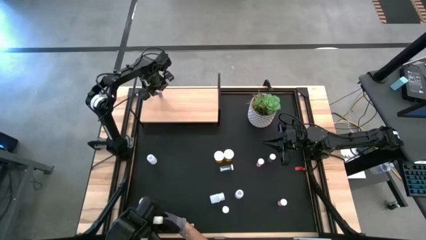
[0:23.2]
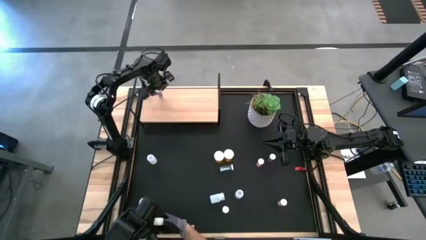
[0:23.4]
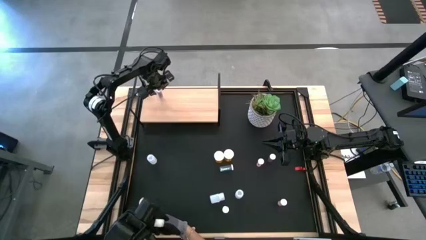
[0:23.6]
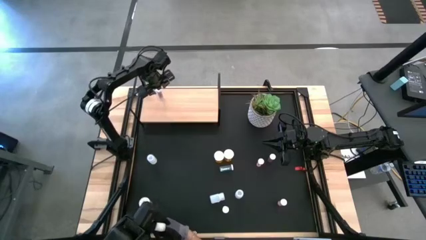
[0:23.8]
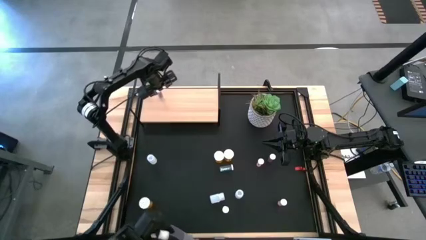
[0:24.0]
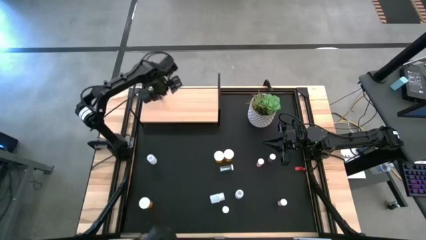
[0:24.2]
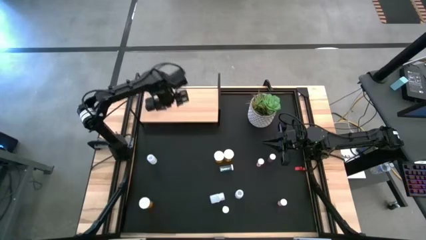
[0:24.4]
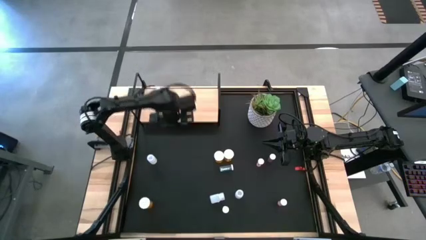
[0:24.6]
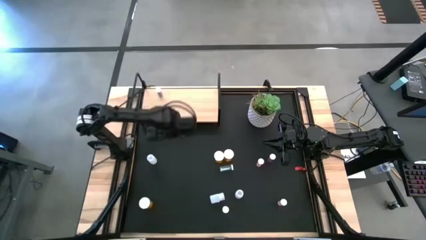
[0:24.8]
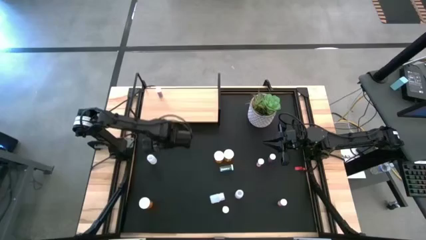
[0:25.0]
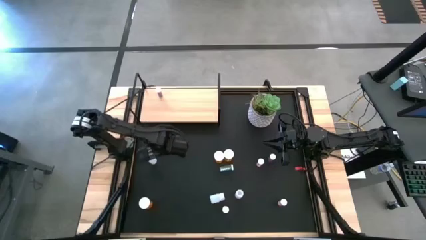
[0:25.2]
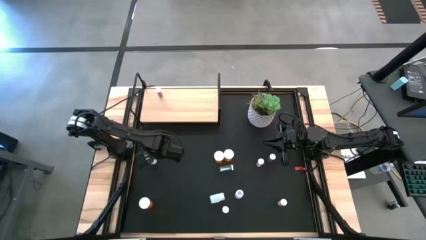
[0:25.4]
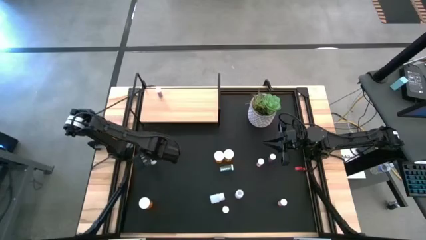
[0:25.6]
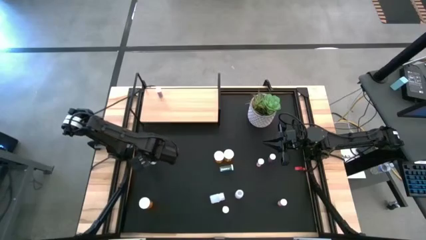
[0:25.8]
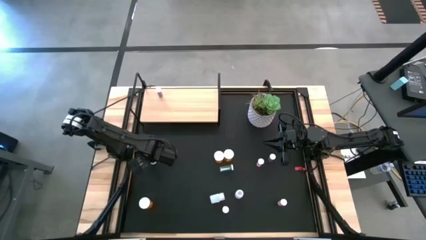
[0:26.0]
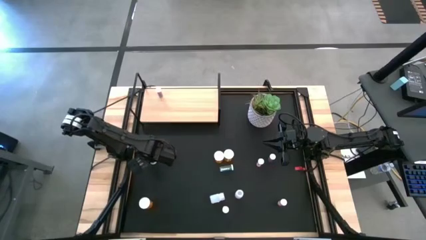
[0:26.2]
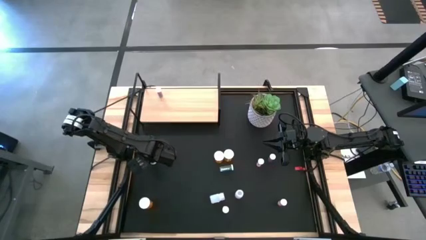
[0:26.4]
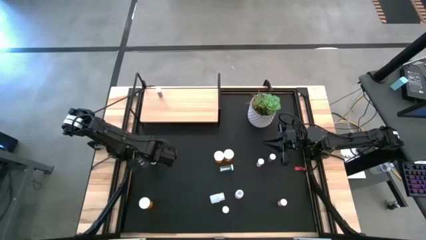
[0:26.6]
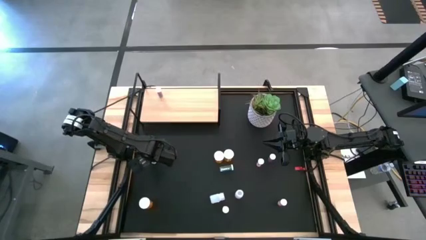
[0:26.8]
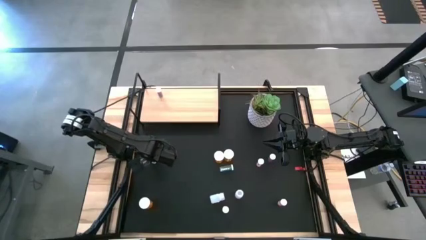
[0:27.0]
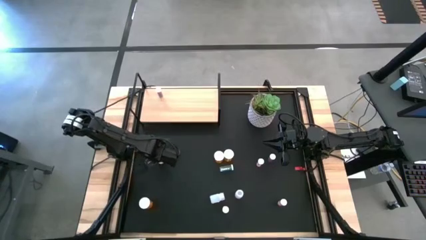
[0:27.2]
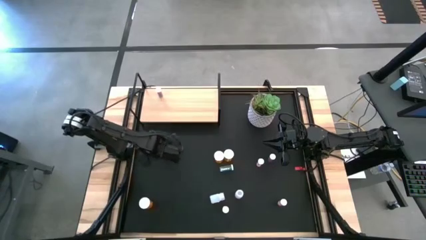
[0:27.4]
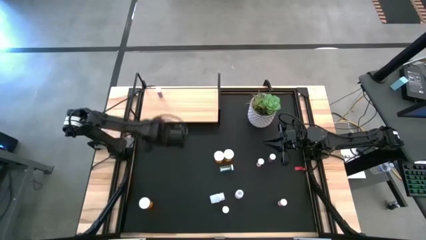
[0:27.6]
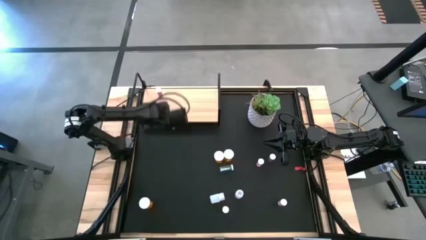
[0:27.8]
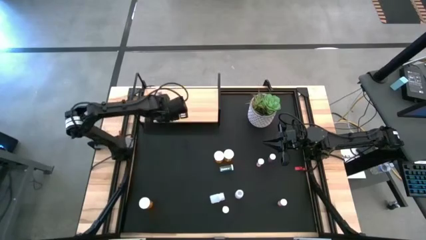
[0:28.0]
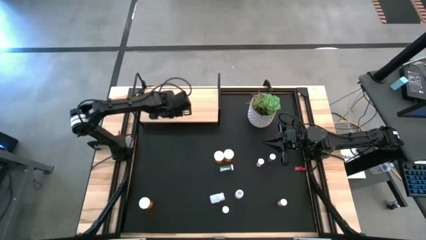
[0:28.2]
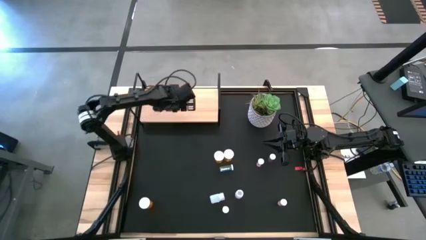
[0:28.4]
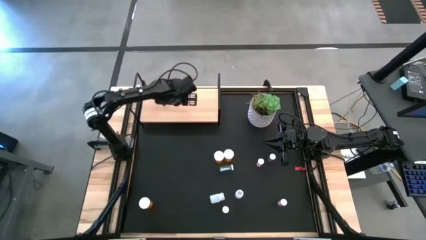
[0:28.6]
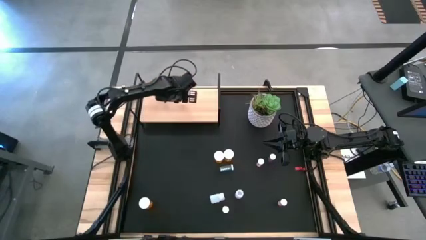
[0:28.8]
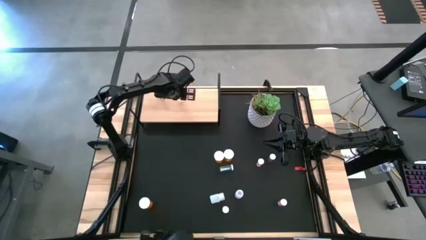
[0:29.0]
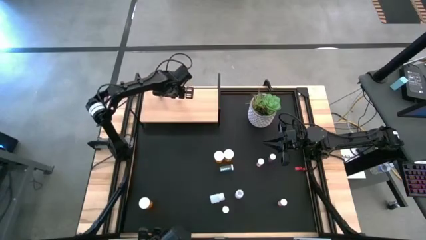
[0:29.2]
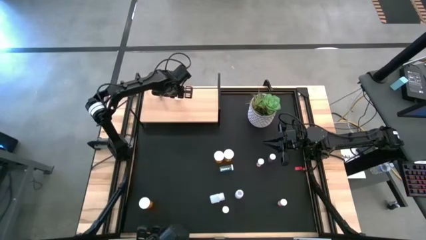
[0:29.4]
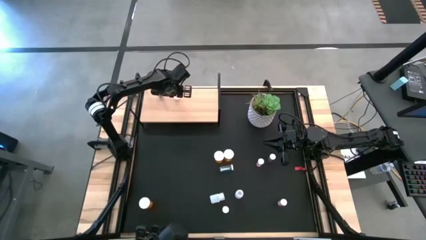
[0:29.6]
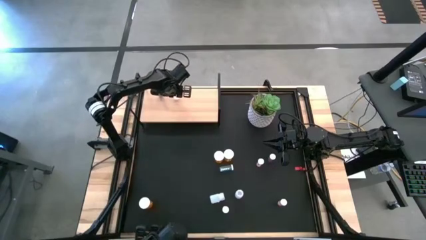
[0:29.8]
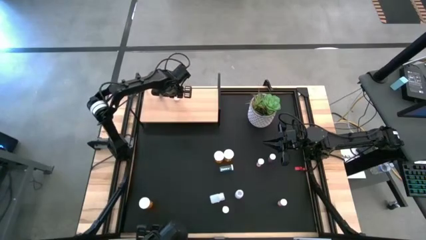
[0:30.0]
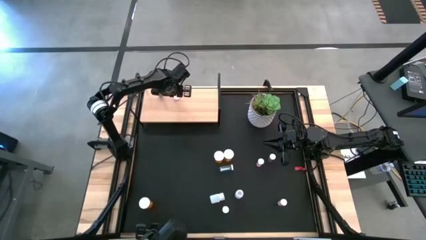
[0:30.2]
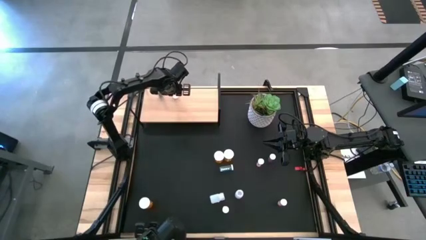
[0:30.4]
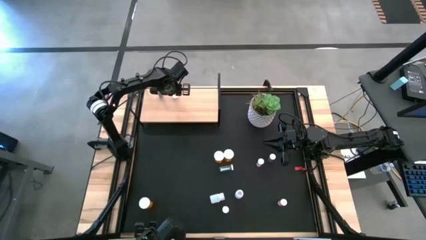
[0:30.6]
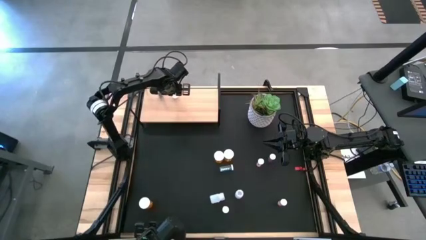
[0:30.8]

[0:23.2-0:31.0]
Task: Pick and place medicine bottles onto shelf by color
Put the top left white pill bottle on the shelf

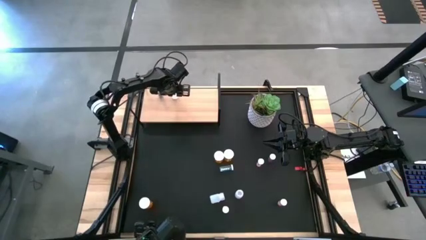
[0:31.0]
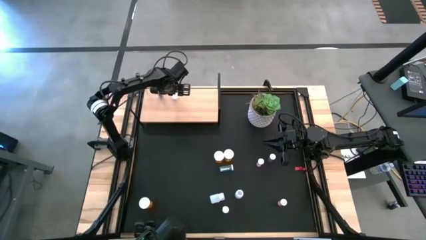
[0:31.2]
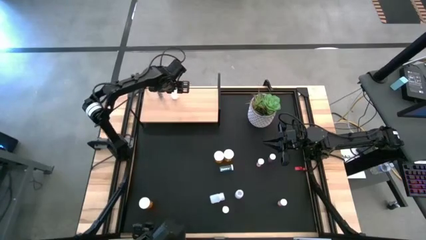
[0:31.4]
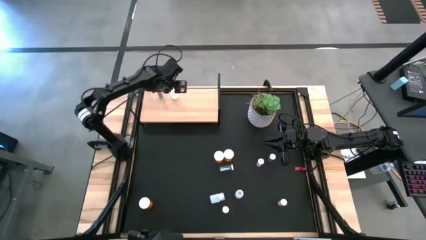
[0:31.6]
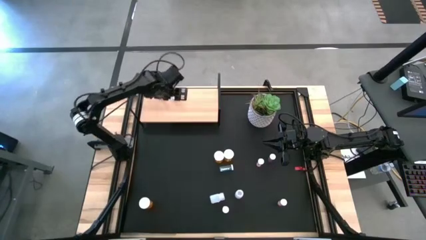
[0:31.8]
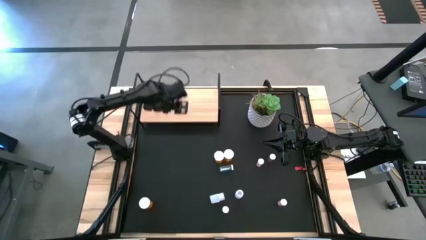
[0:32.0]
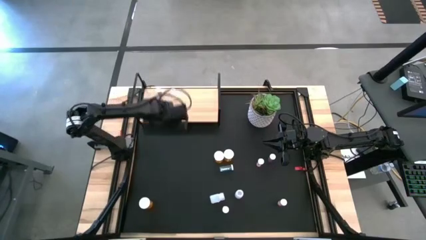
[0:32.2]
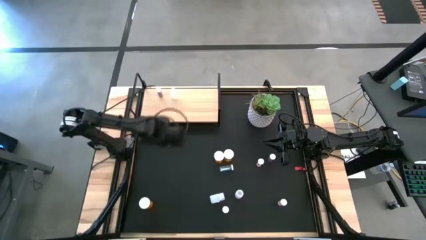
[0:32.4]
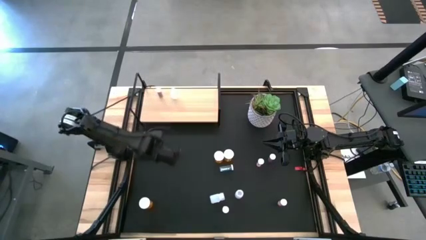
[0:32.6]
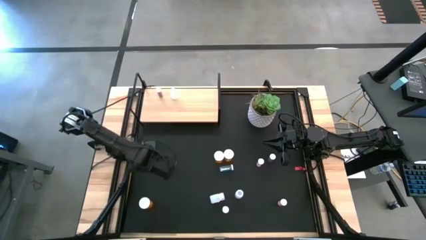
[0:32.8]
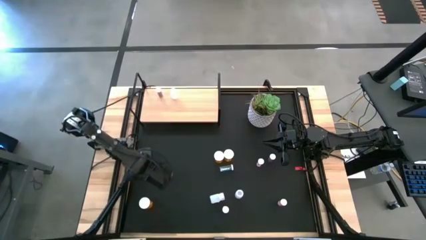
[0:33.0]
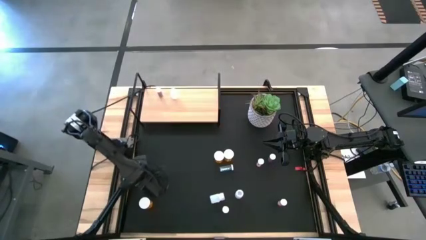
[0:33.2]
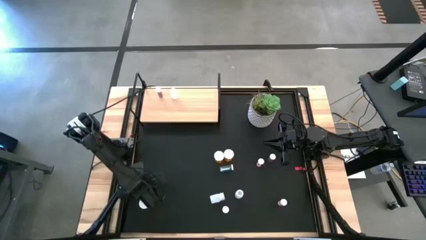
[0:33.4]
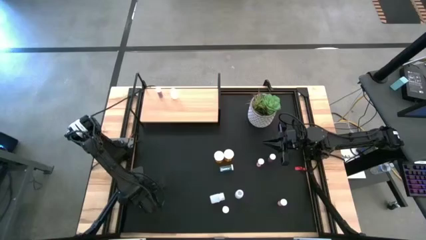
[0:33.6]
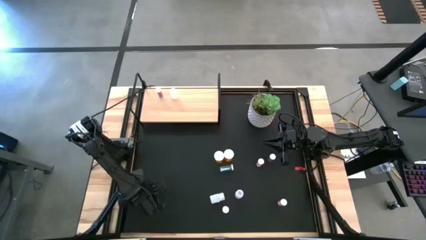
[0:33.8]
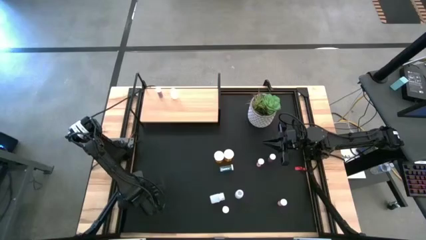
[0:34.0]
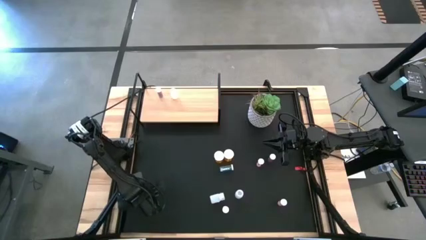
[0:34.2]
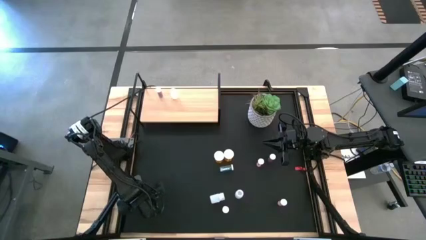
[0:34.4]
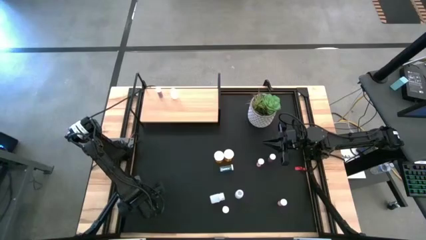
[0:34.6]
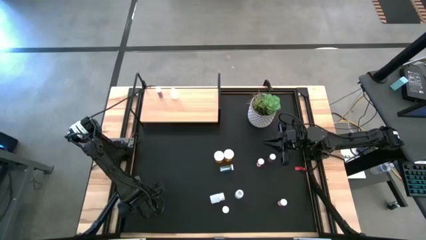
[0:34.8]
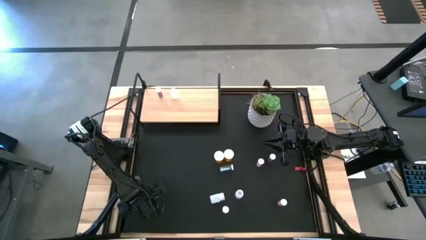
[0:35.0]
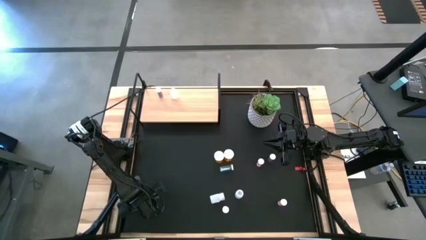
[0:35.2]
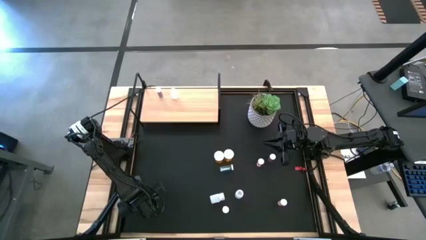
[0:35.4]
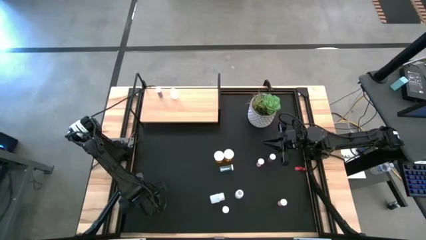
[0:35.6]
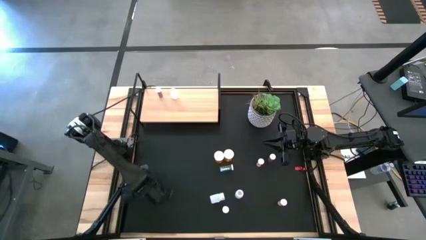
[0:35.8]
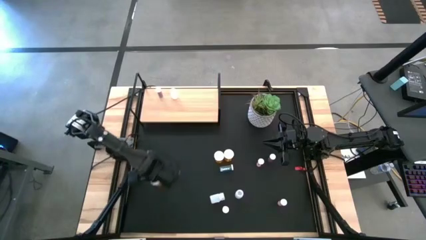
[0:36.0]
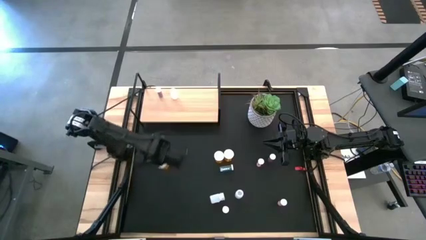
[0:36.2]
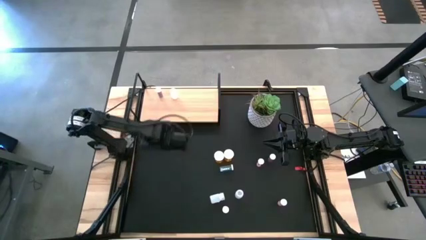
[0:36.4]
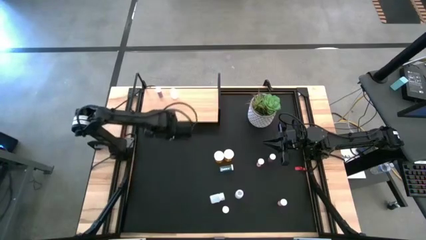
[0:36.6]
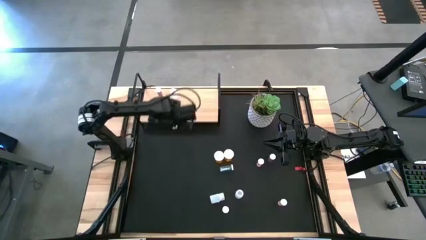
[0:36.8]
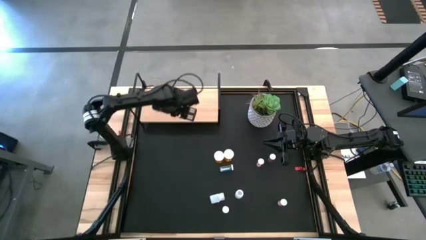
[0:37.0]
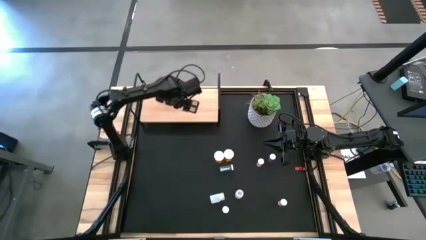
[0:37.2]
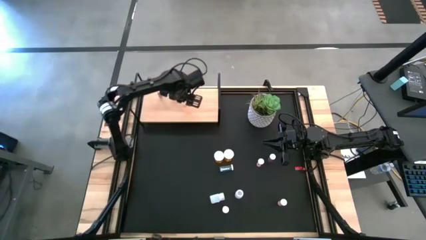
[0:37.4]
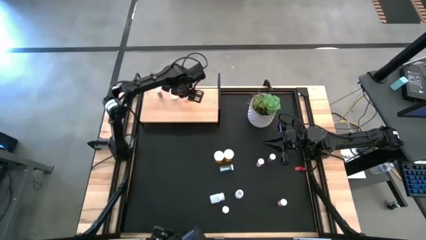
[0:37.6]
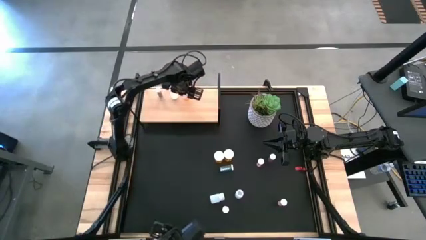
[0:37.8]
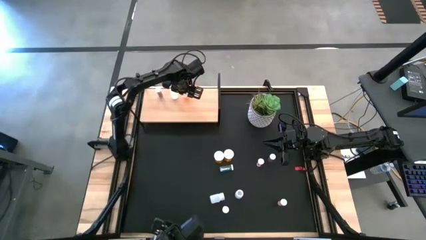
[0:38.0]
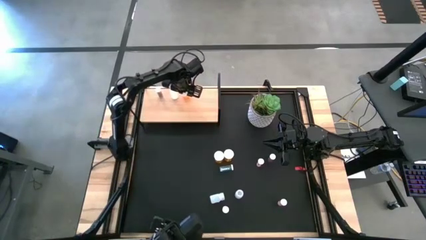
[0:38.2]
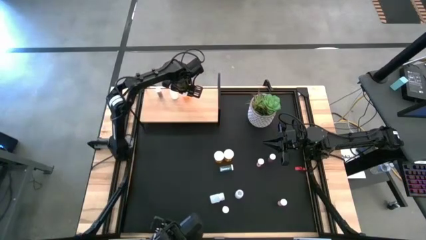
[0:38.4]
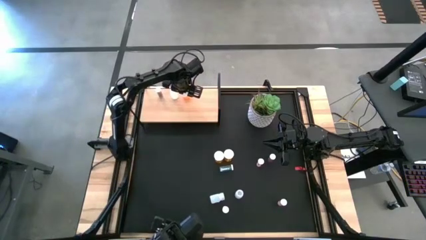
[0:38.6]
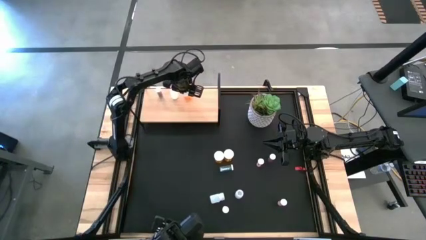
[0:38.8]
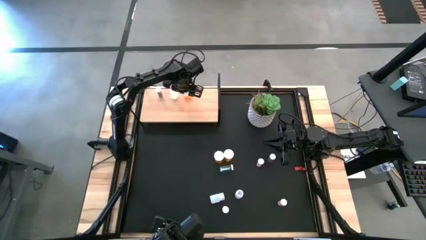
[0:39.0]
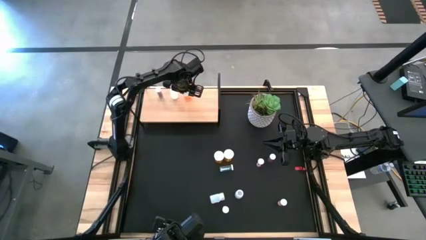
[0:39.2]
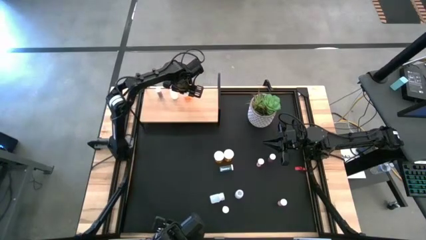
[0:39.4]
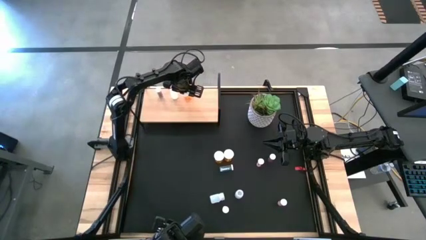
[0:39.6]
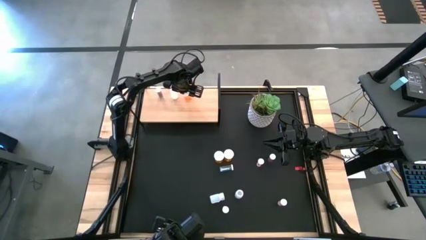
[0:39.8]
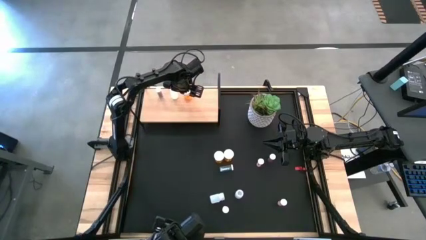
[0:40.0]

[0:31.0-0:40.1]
Put the bottom left orange pill bottle on the shelf
